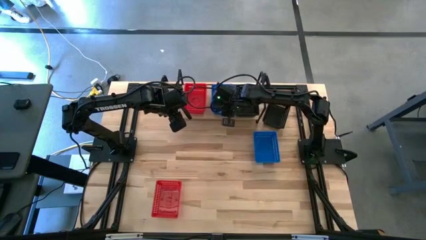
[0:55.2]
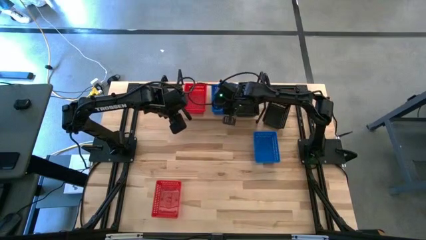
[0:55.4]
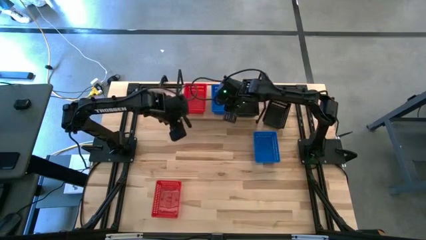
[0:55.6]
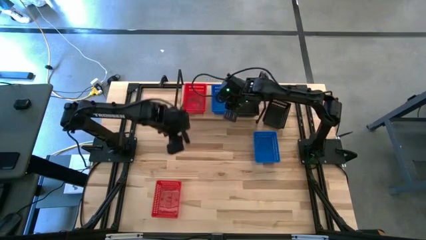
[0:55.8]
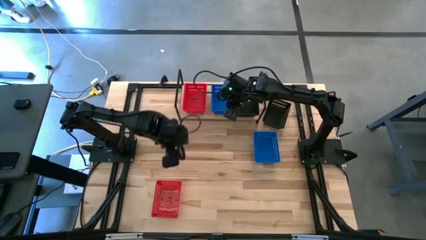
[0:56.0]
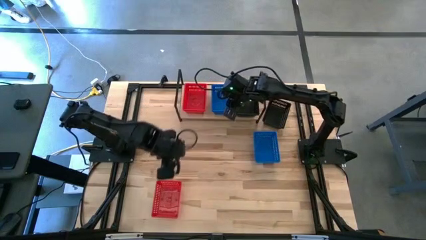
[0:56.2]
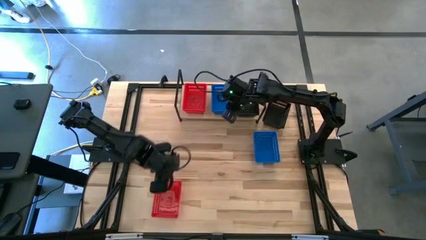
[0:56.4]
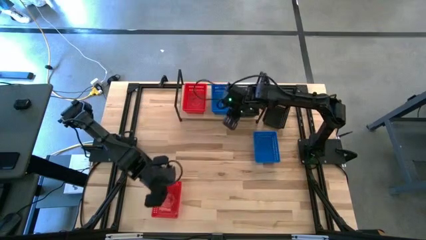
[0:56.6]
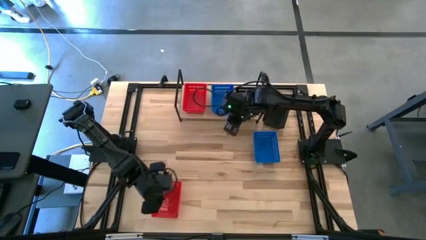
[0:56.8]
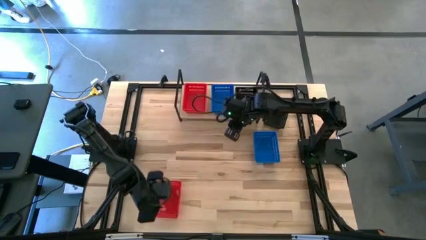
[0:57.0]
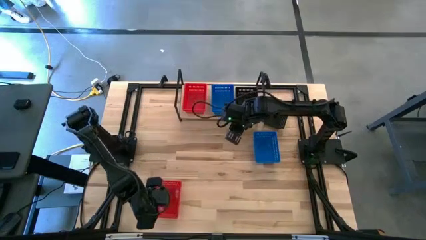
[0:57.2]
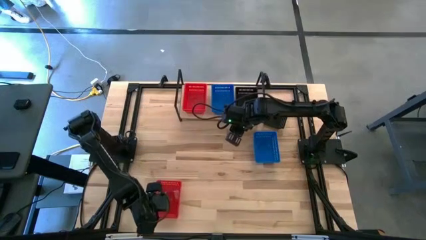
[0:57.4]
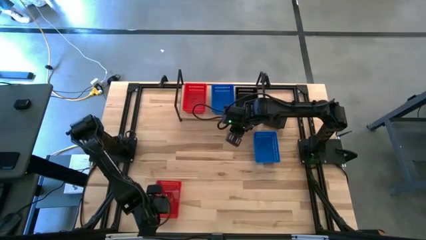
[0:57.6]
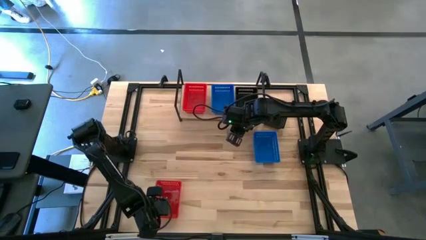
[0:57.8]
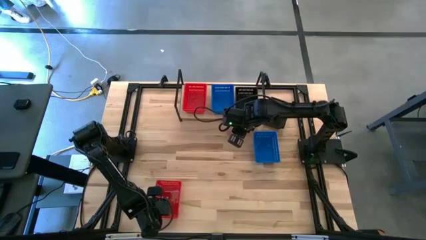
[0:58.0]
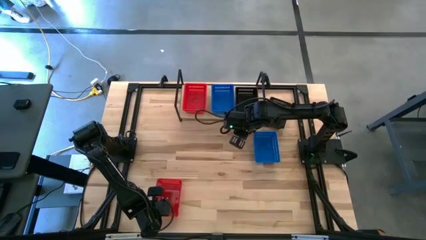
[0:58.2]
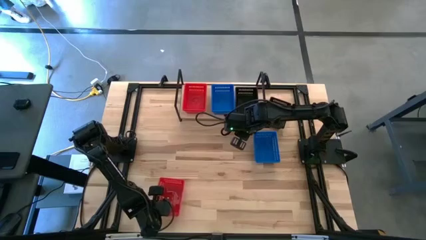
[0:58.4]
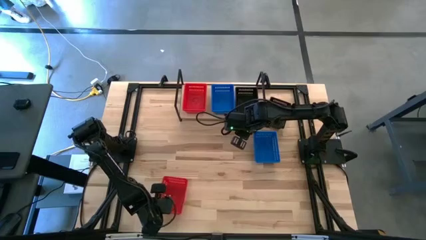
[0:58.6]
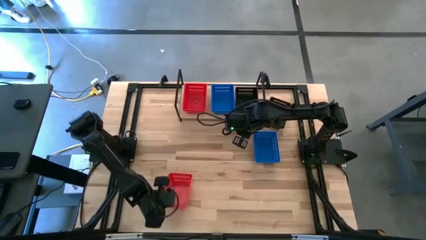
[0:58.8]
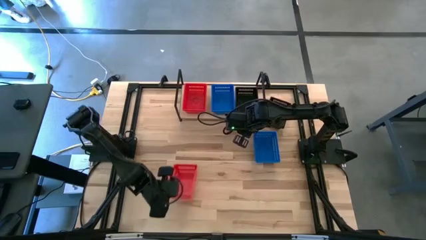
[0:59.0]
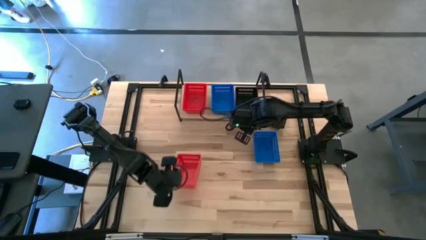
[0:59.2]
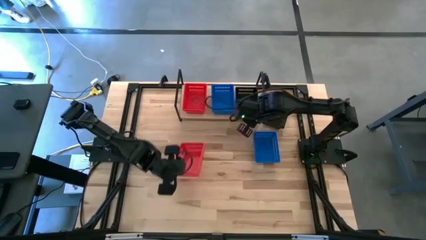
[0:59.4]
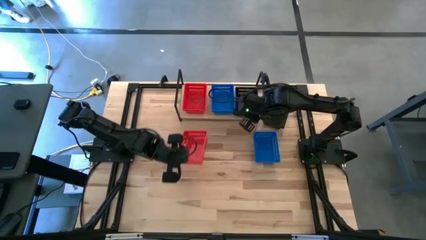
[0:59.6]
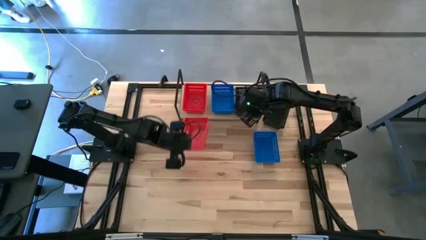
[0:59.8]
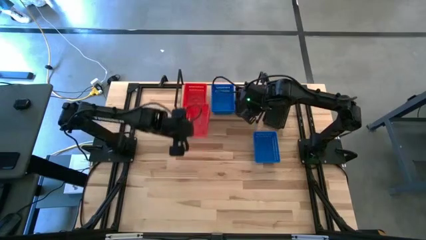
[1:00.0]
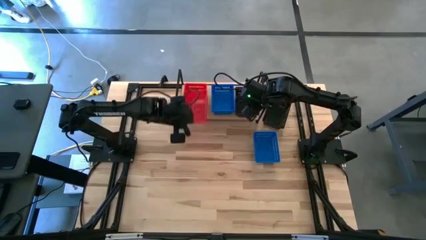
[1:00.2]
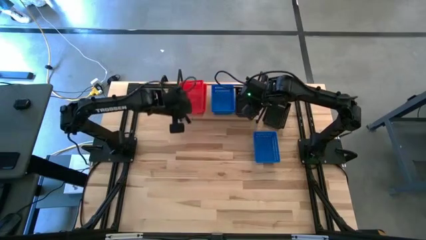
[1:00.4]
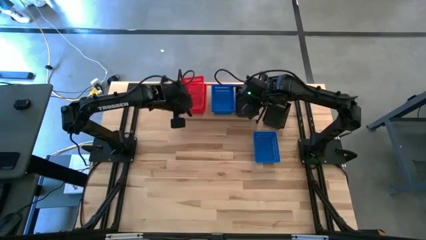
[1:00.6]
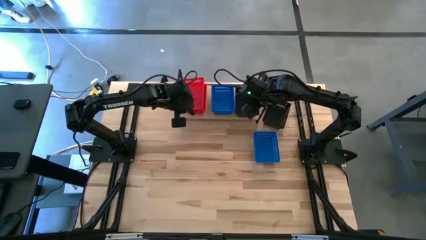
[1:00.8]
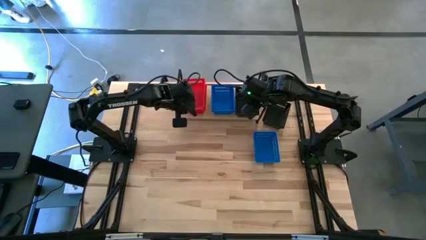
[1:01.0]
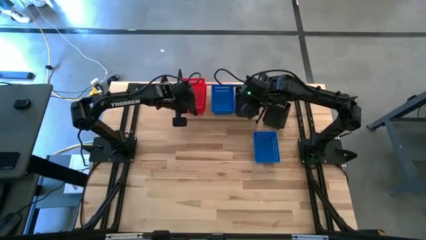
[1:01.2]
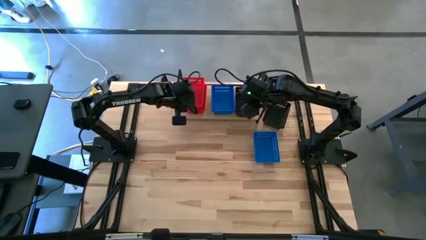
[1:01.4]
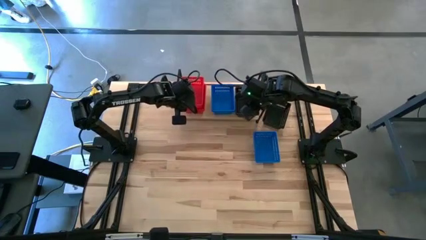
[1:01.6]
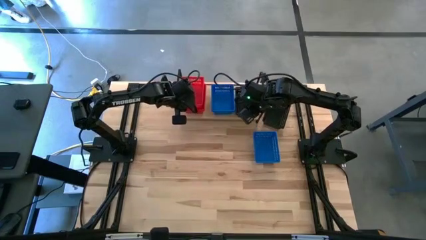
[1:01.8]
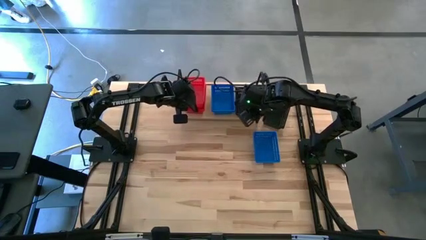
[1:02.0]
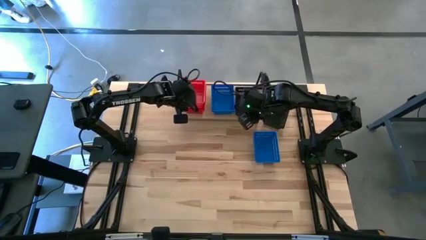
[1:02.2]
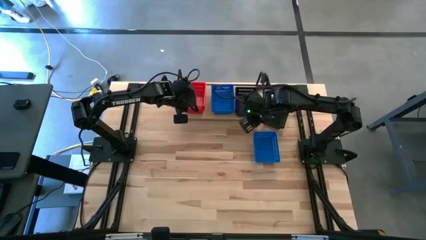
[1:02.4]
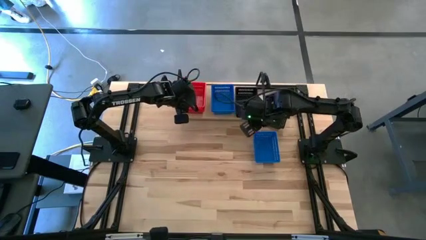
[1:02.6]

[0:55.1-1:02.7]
Task: Stack baskets on shelf by color
Stack the red bin on top of the red bins on the shelf

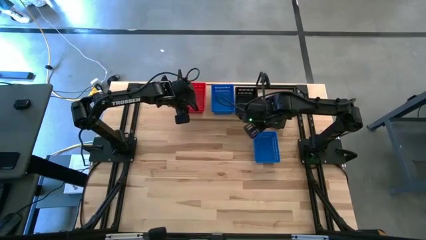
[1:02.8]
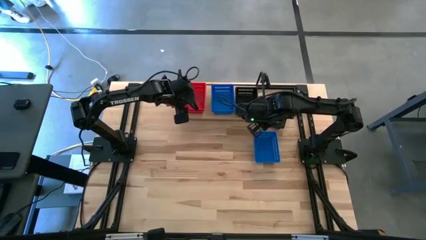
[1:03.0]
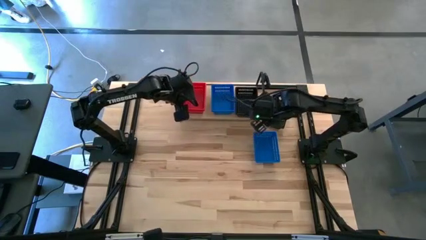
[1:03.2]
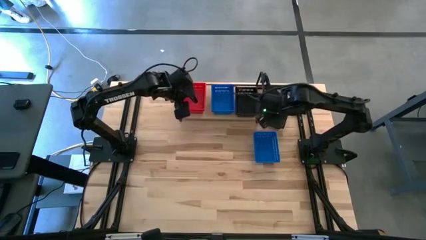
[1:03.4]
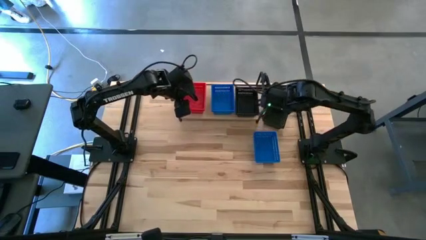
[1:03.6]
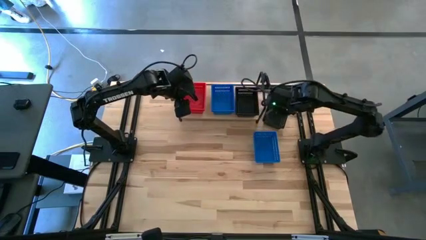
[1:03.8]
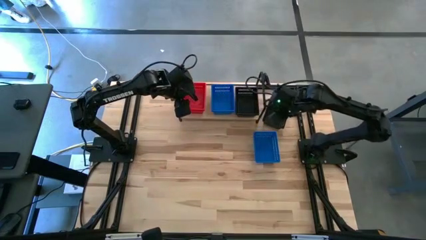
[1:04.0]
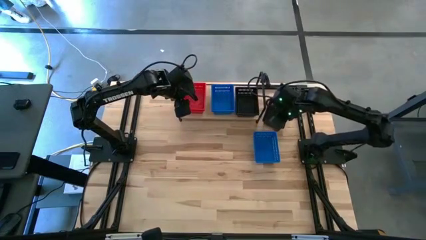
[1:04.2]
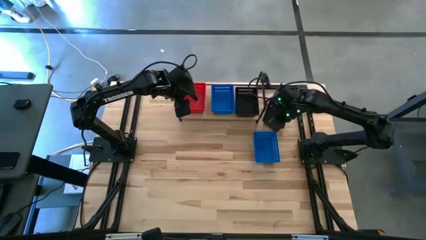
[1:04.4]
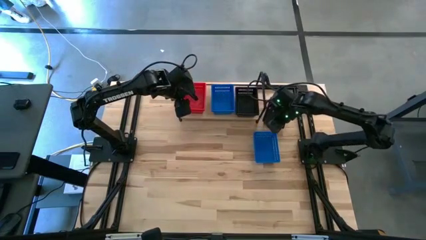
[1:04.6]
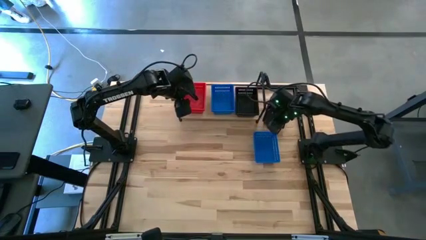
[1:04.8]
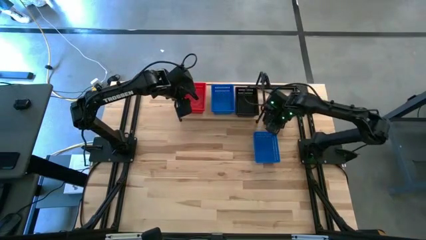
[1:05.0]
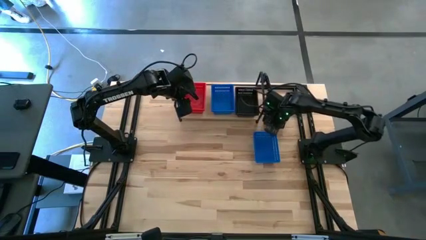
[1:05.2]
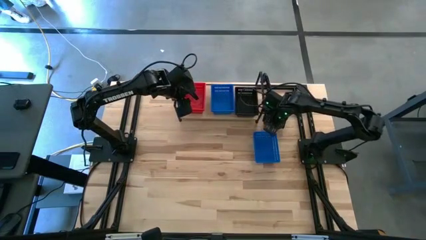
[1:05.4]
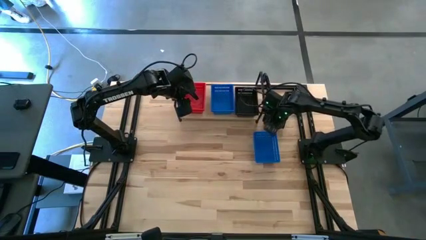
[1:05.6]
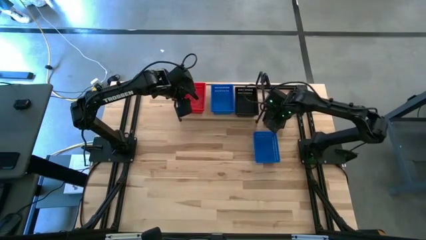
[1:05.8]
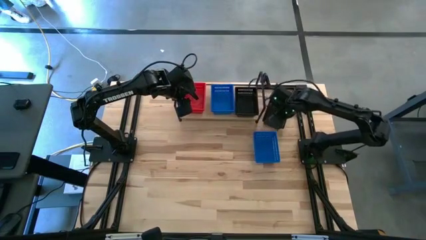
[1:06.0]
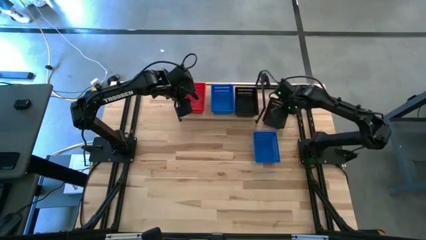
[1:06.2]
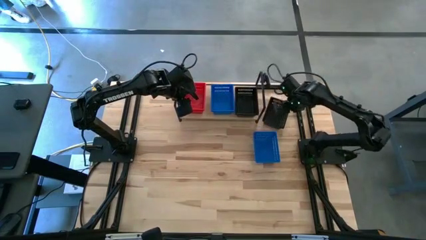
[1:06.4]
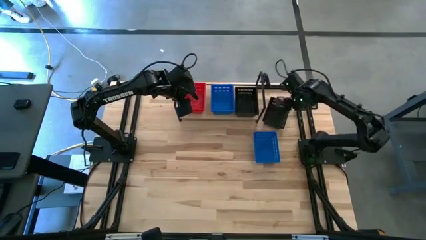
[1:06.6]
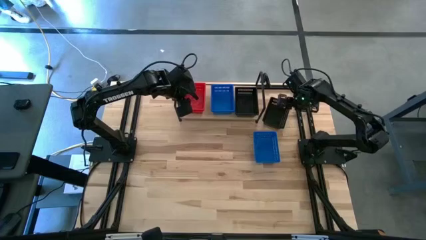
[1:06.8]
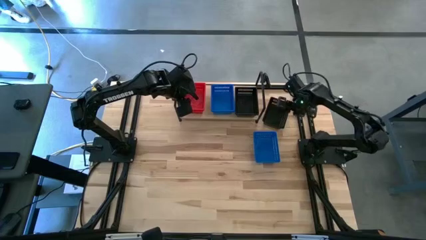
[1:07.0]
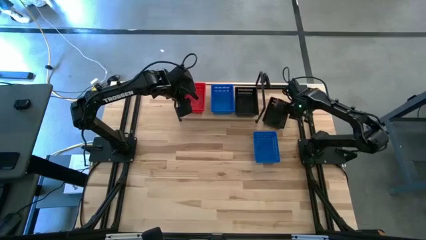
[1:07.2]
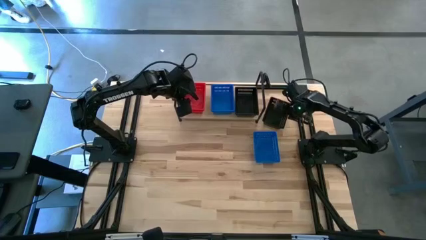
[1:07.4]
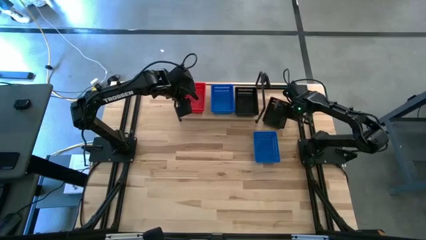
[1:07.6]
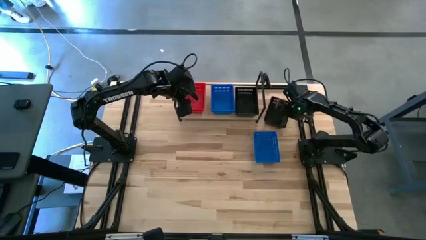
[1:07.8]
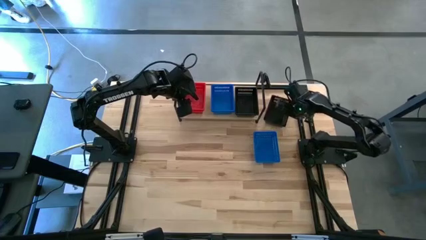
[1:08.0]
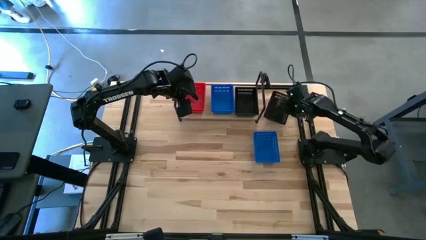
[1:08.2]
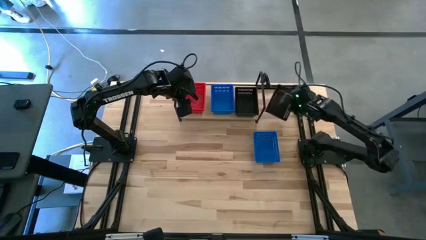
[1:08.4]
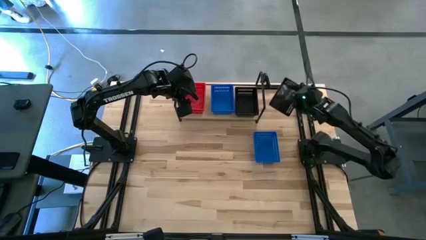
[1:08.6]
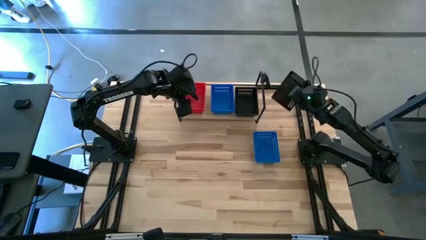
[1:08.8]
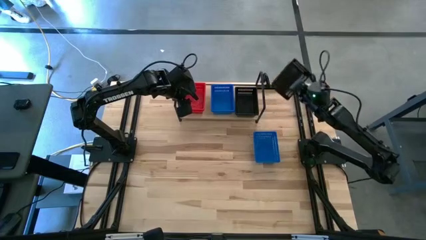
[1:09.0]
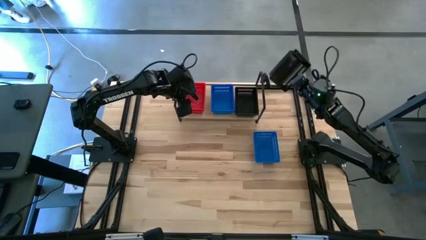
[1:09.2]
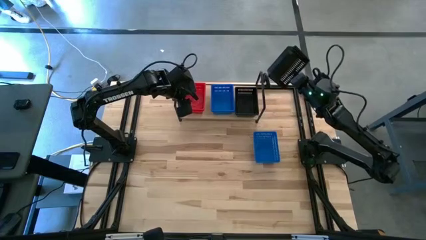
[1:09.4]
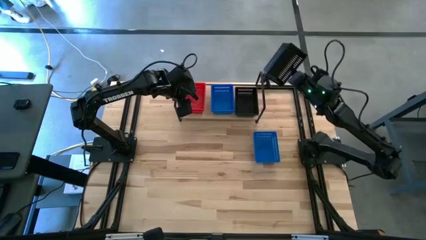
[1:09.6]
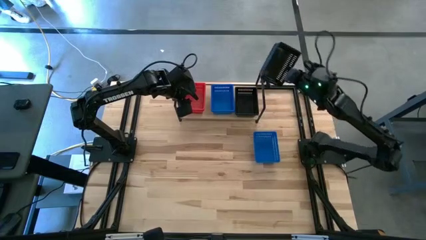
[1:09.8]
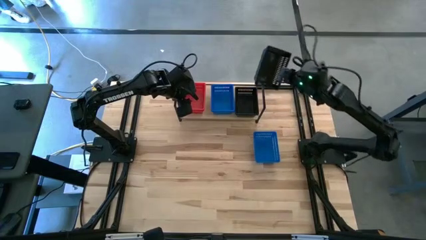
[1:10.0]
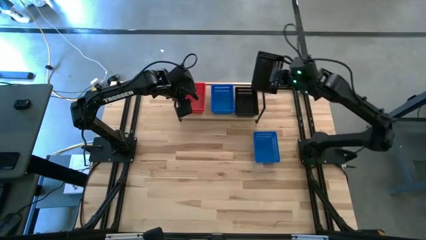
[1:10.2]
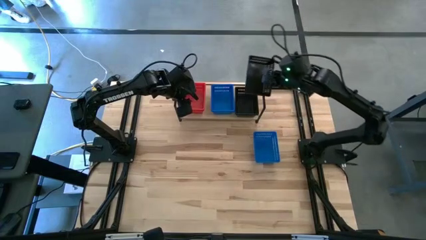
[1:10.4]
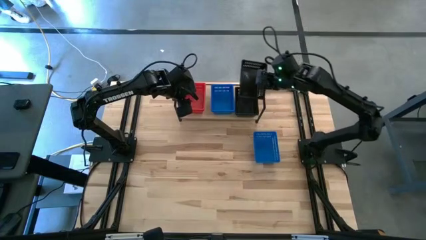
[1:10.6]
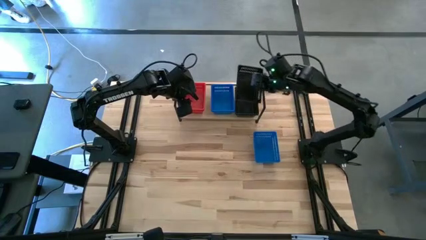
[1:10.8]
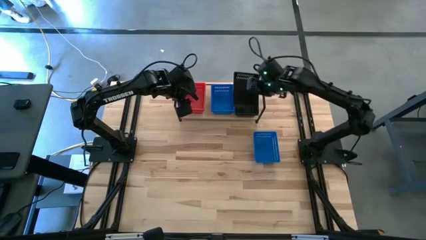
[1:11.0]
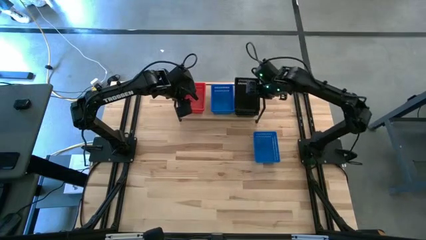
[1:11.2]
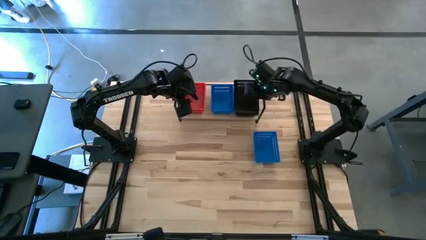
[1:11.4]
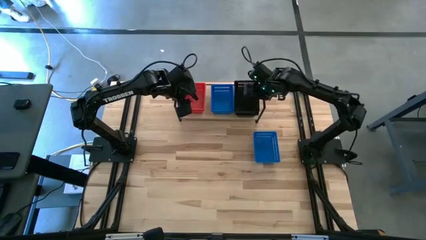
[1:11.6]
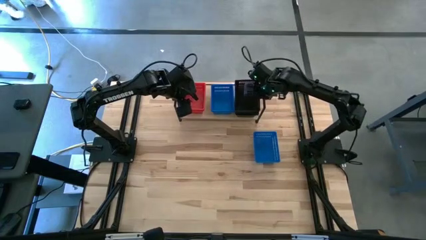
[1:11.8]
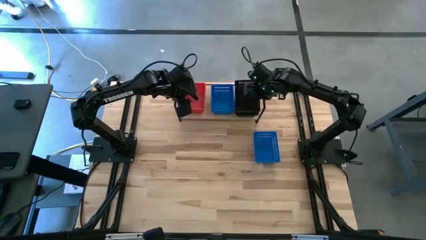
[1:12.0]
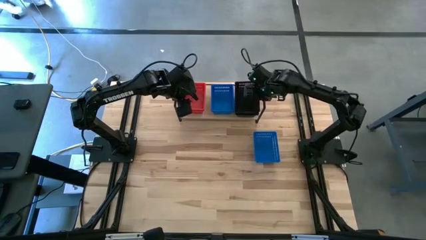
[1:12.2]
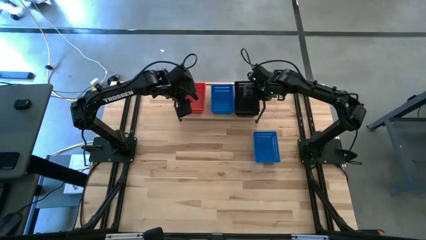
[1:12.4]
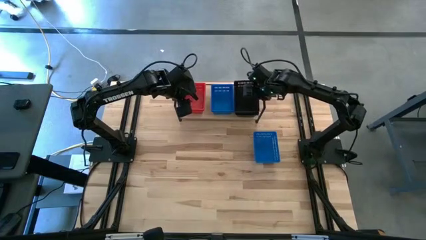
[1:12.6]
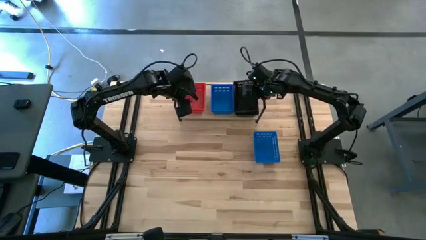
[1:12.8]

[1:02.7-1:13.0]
Stack the black bin on top of the black bins on the shelf
